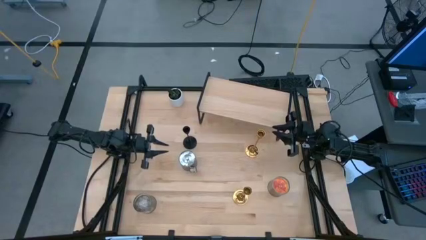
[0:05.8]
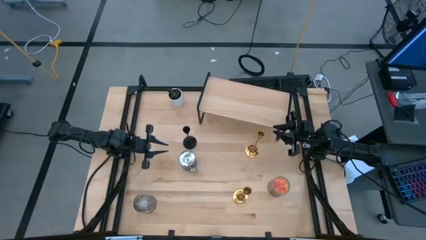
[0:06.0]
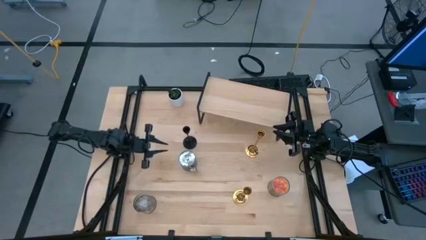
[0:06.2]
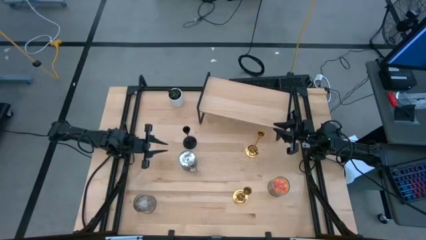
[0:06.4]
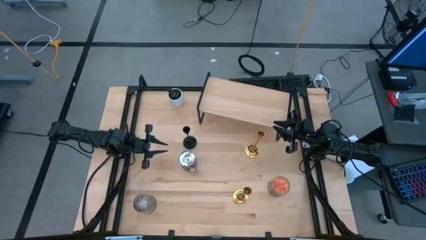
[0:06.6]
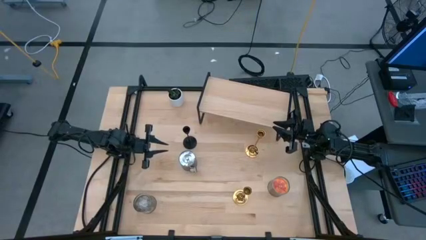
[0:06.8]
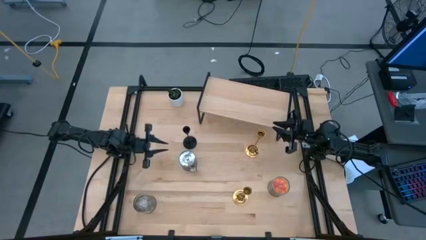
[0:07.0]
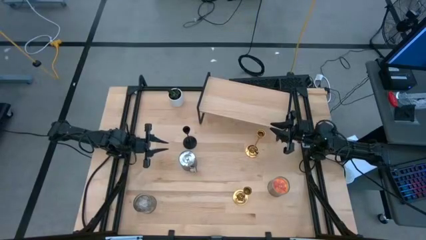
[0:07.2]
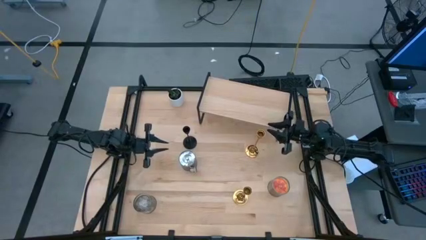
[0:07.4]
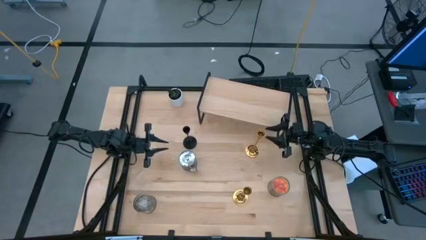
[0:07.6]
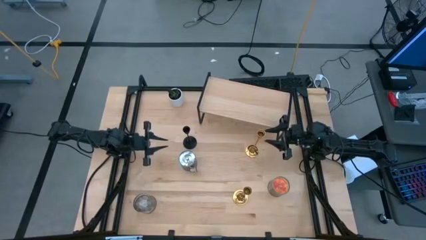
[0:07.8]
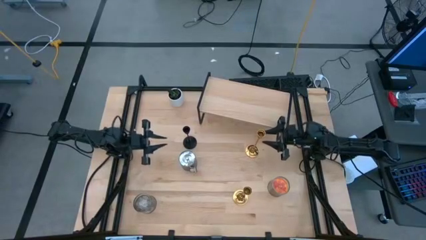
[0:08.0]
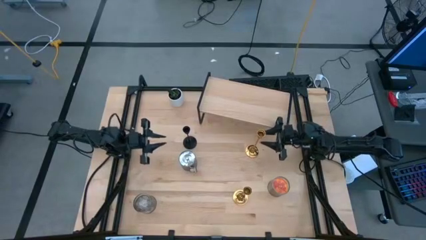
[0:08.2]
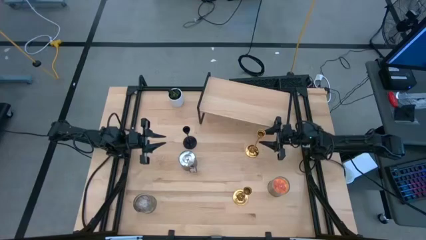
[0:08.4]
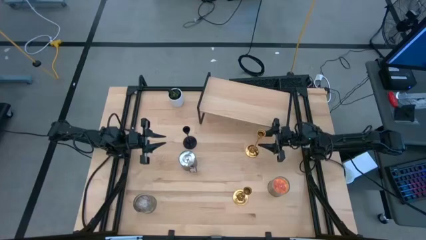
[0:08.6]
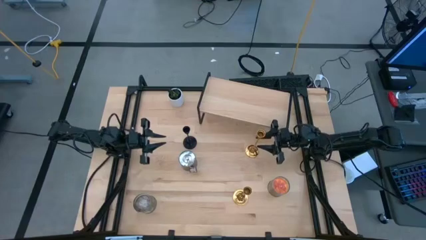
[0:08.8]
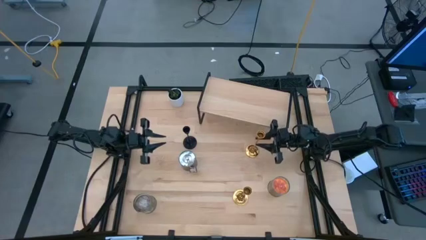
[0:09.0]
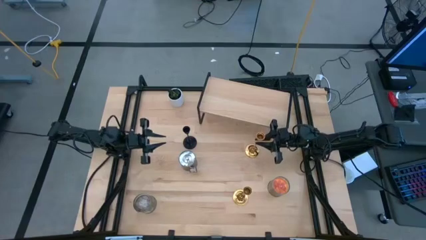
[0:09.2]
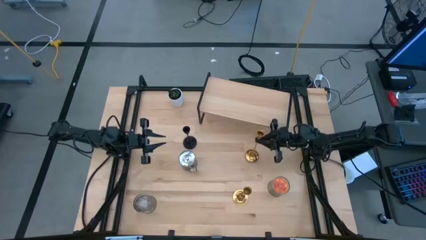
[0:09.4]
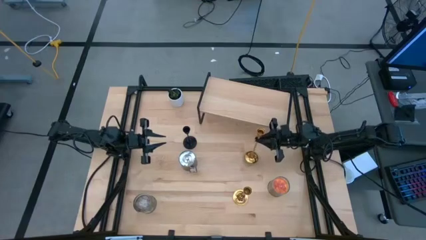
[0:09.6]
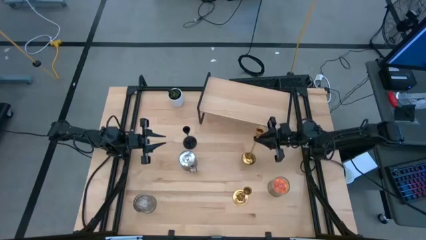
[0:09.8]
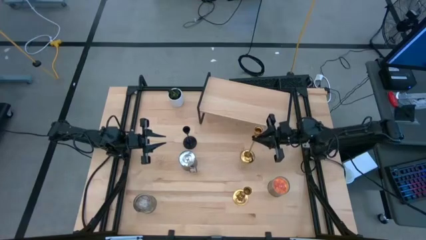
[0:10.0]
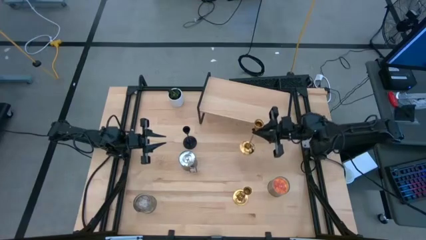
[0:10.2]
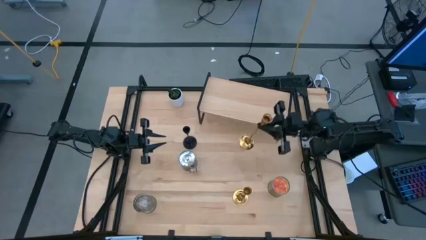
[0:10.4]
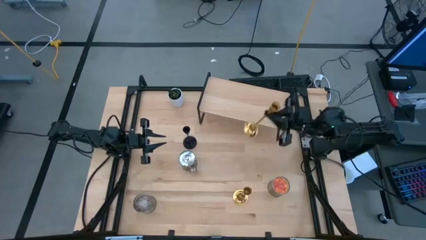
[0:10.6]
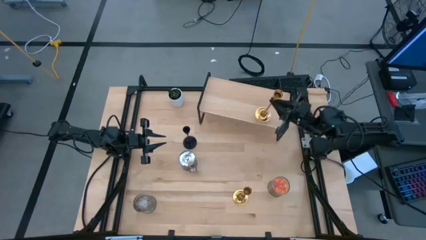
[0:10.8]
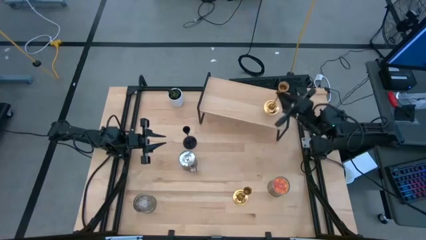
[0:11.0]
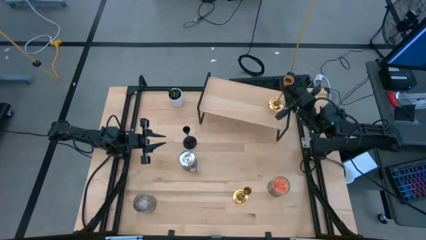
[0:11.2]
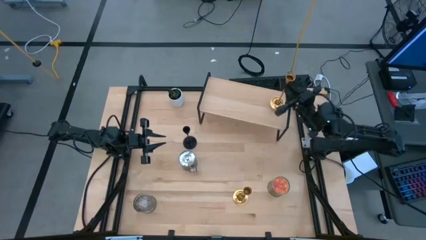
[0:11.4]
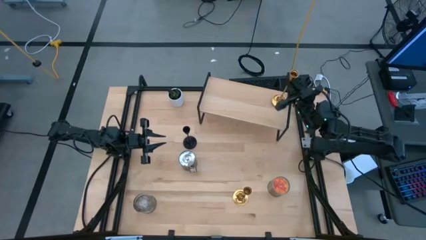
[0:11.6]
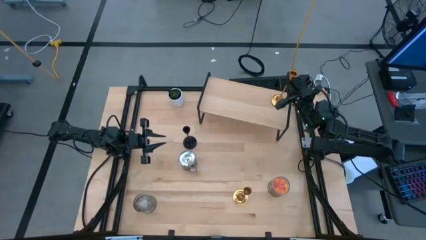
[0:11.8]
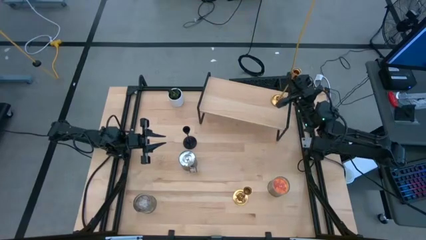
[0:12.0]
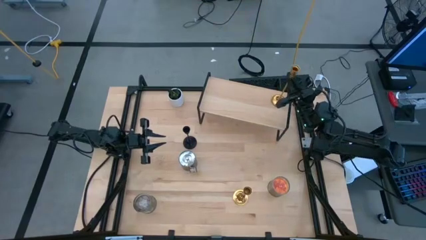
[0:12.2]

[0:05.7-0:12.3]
Task: Pick & Place candle stick holders
Put the top gold candle holder on the shelf

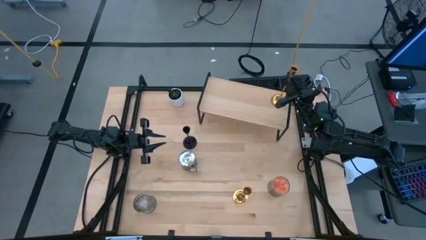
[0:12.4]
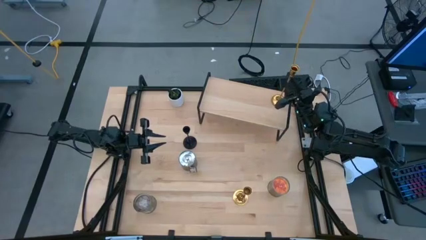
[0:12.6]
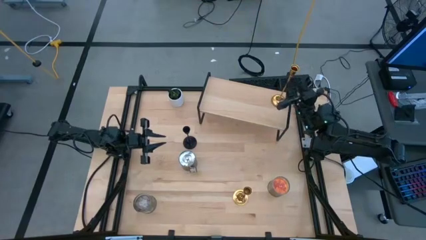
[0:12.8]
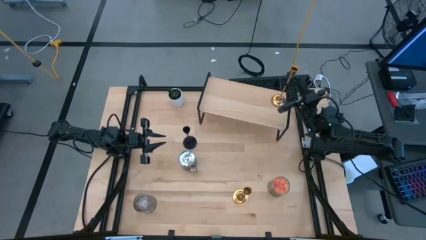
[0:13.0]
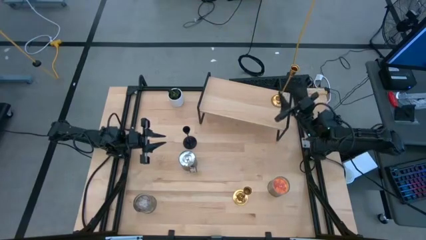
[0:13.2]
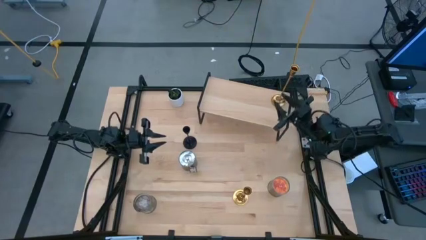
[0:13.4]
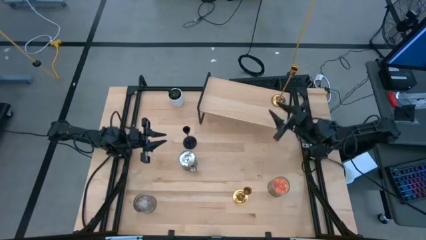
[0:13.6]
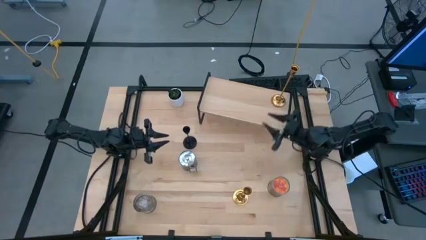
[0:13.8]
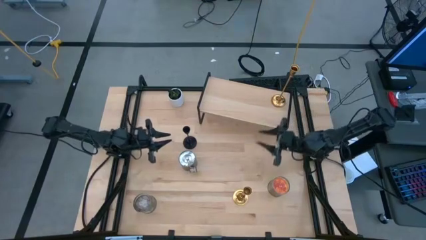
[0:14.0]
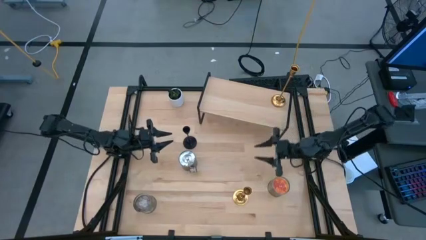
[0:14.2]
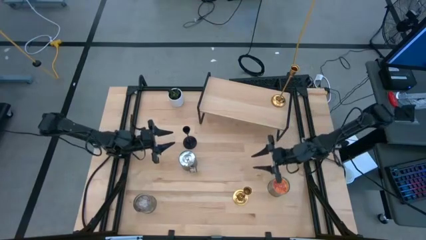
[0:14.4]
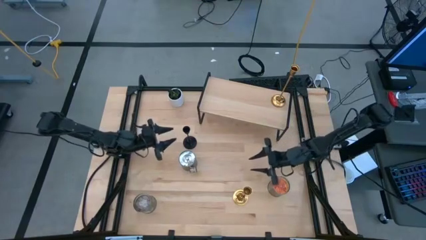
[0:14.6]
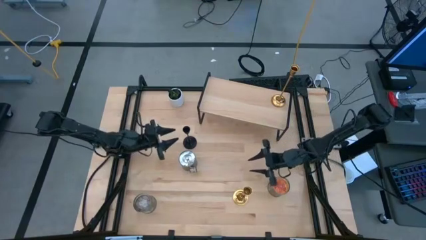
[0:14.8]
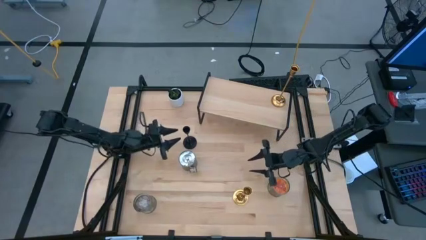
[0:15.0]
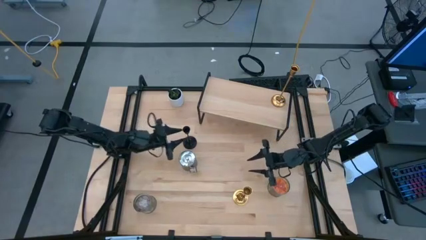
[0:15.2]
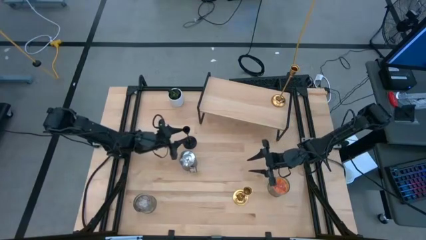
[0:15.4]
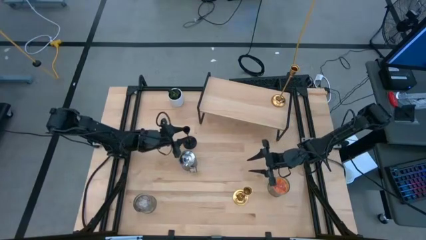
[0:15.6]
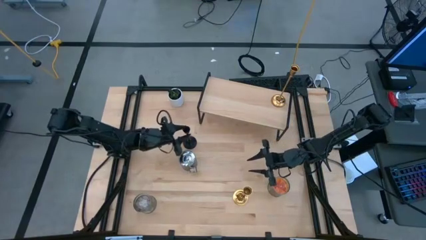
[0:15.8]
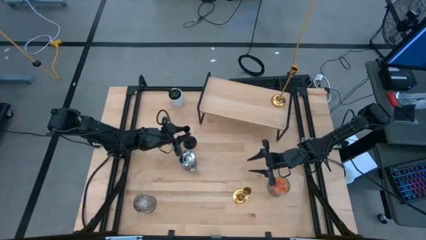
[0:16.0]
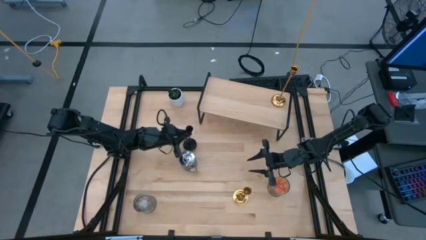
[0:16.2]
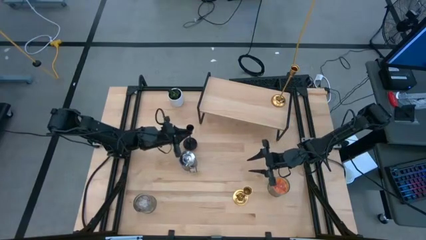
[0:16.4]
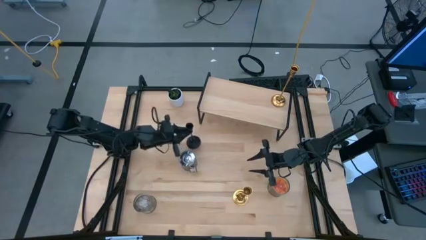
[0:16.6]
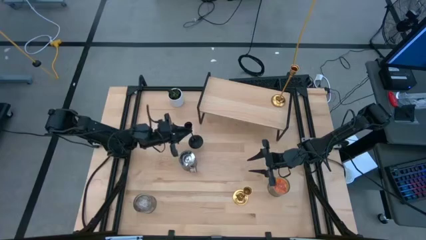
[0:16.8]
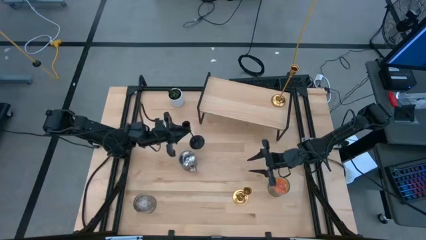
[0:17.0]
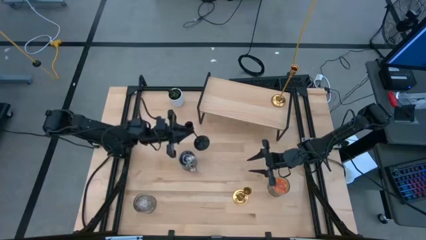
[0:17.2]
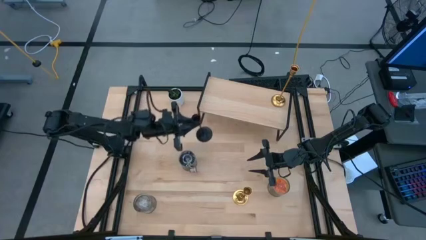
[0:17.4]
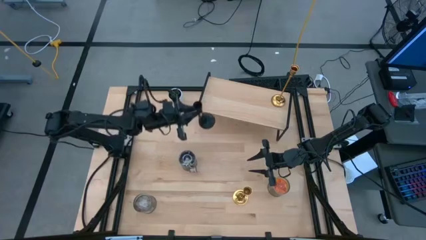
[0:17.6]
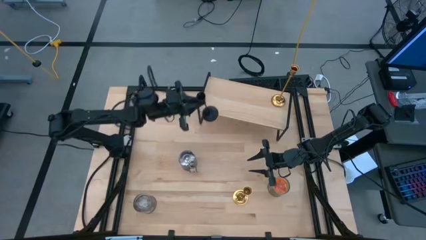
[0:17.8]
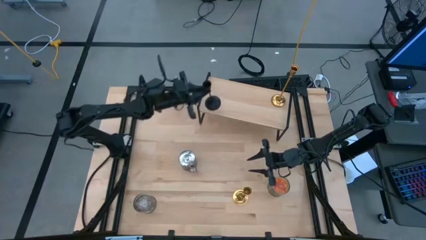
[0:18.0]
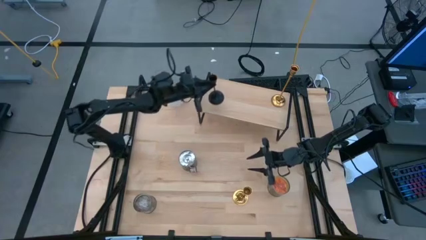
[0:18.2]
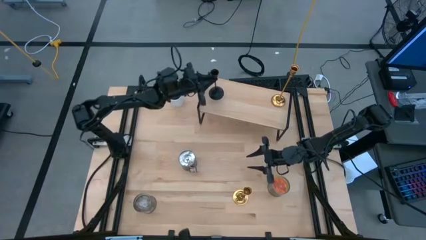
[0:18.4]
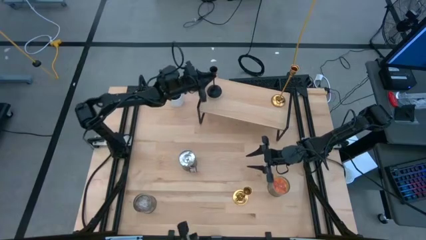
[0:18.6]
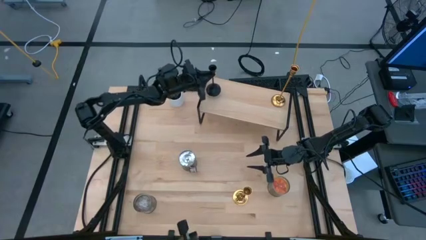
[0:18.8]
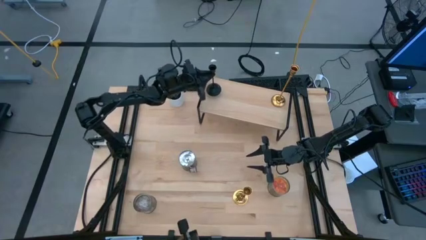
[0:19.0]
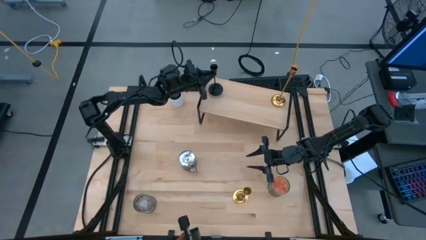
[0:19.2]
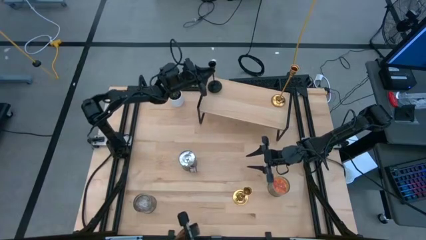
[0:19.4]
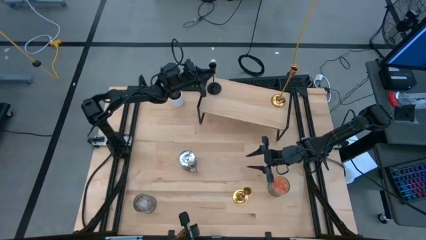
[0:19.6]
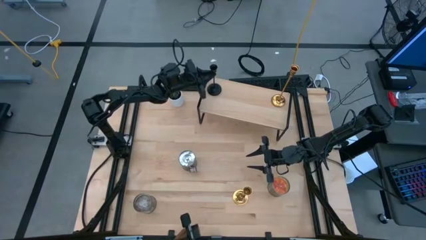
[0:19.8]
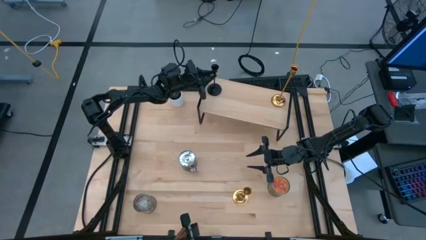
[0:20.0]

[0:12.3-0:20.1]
Put the black candle holder on the shelf

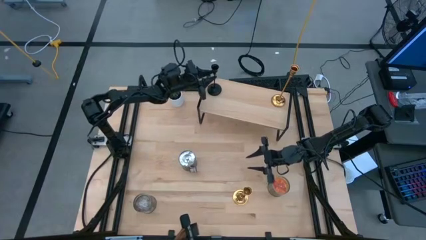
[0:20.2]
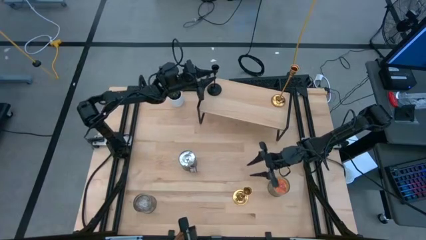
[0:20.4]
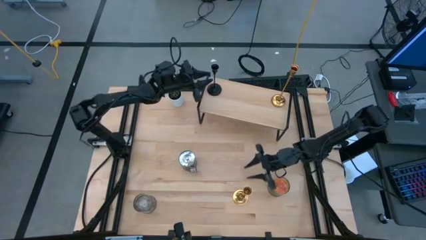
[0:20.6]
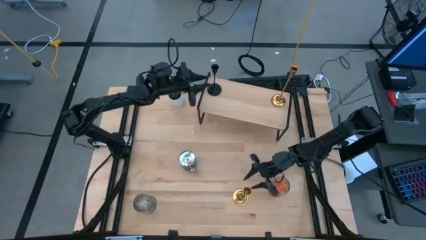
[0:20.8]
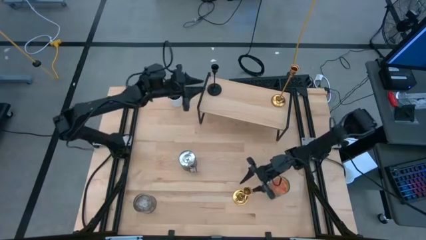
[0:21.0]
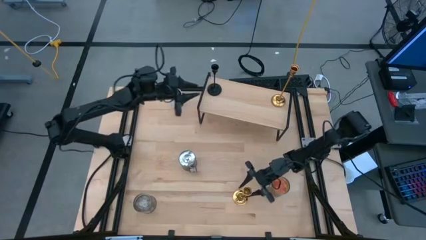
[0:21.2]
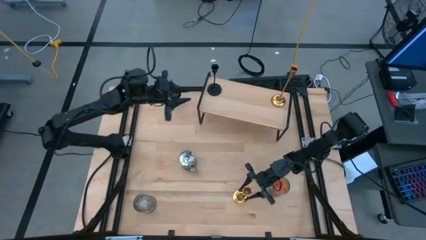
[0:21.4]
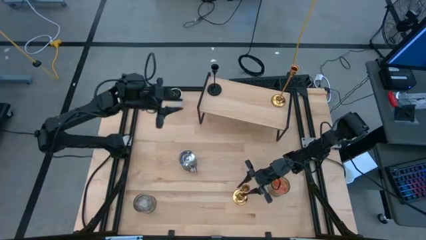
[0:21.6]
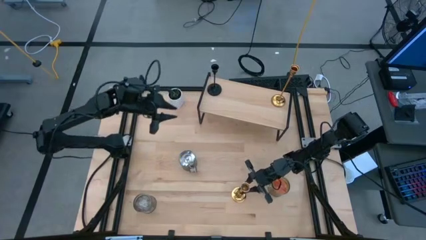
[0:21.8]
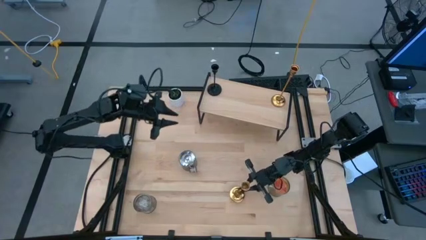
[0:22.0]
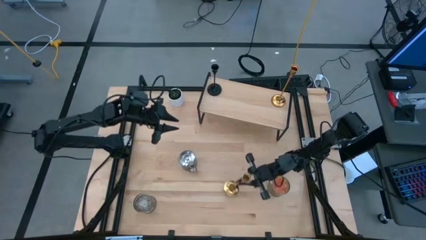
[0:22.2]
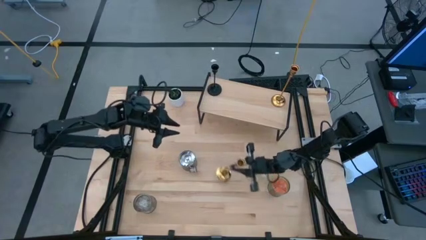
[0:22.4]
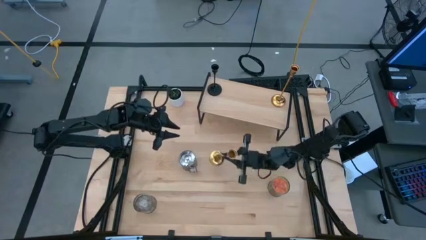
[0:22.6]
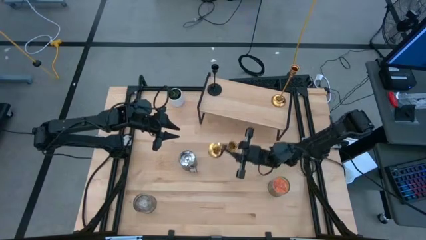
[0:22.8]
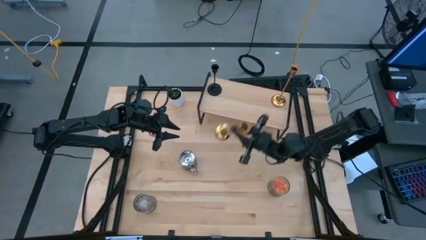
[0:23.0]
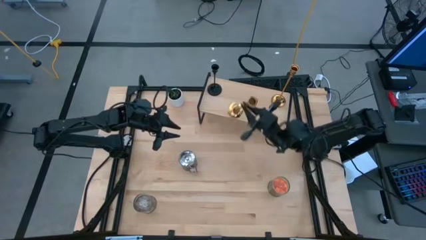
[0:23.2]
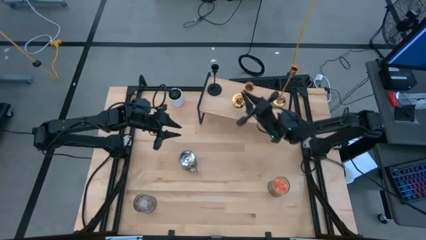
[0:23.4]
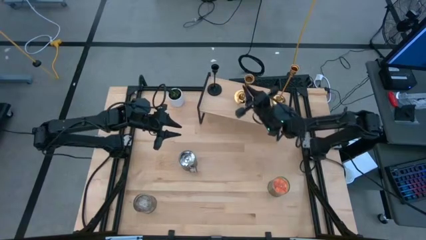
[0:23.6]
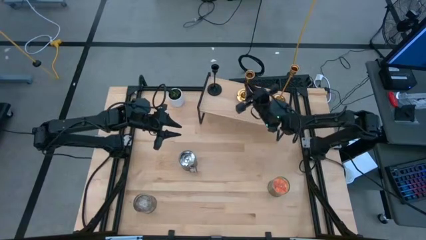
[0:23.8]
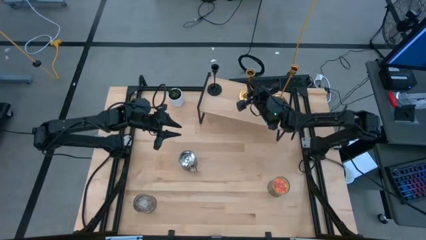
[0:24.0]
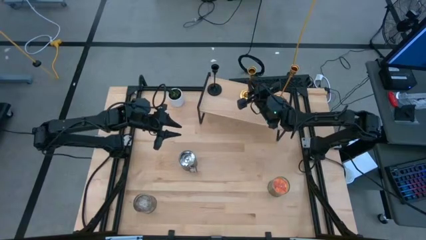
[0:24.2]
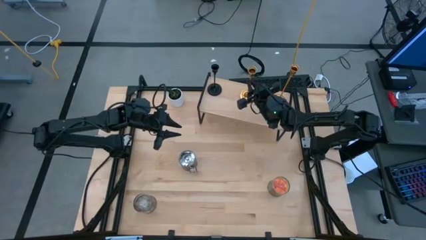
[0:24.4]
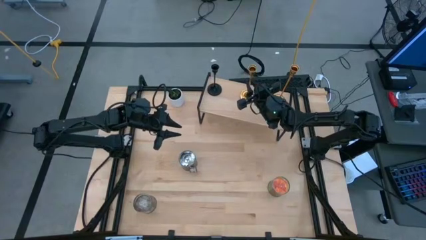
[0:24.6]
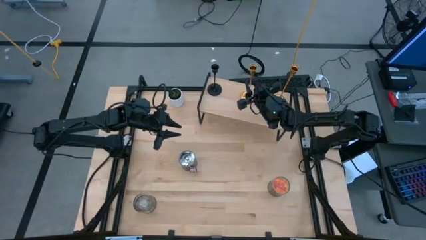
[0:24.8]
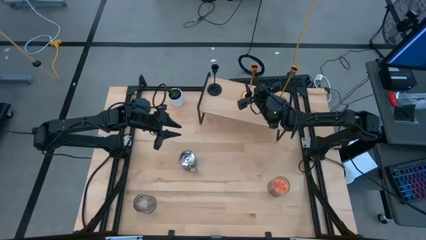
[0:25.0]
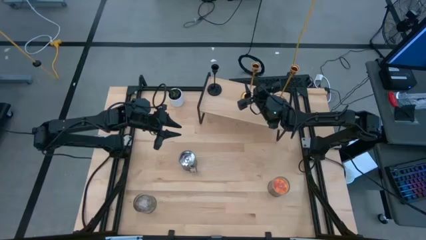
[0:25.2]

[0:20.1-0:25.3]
Put the gold candle holder on the shelf
